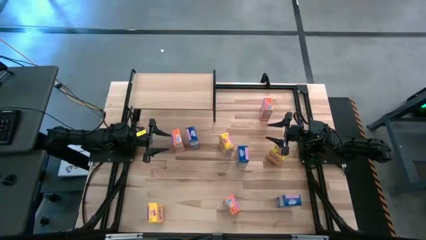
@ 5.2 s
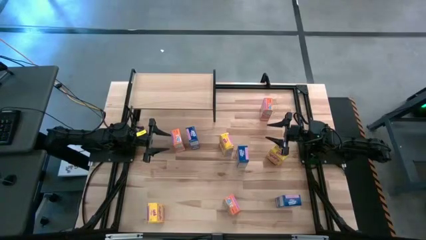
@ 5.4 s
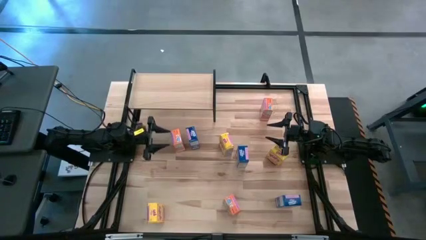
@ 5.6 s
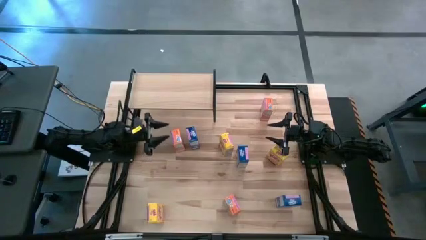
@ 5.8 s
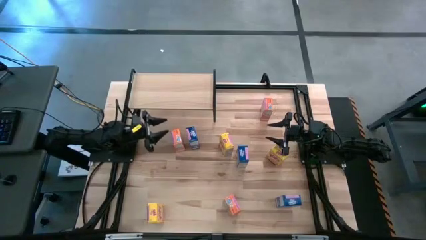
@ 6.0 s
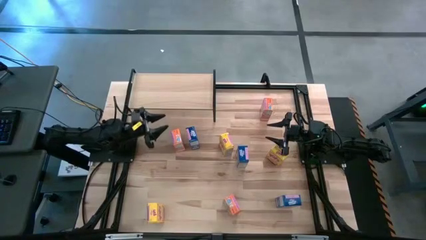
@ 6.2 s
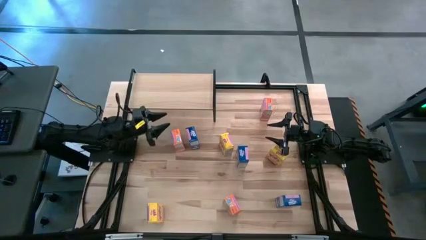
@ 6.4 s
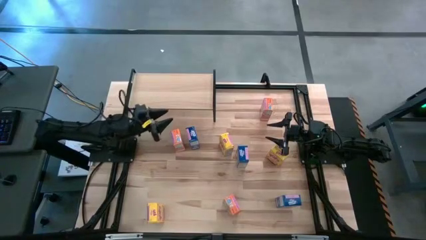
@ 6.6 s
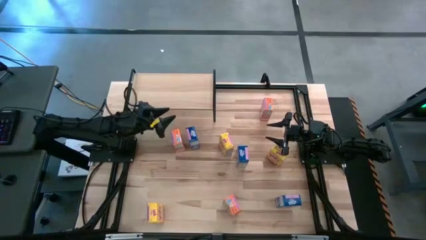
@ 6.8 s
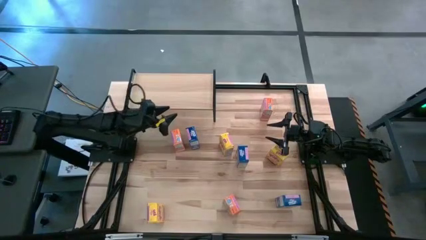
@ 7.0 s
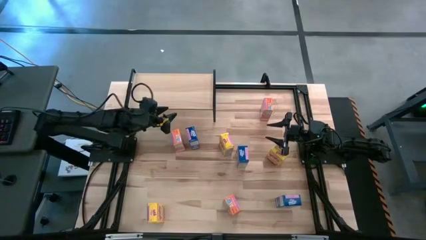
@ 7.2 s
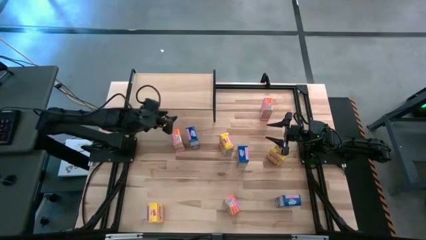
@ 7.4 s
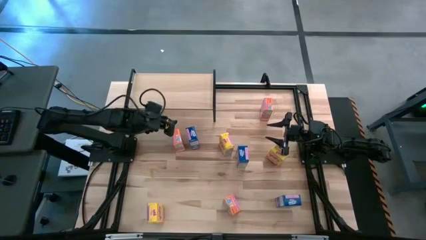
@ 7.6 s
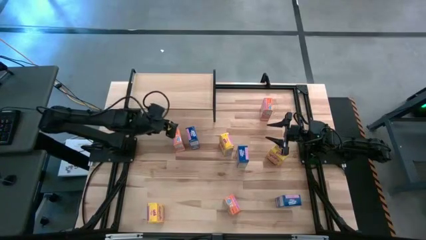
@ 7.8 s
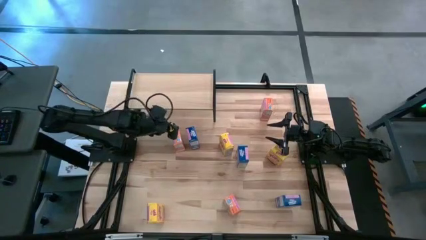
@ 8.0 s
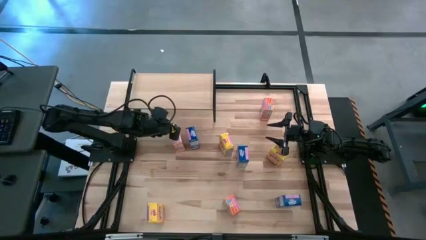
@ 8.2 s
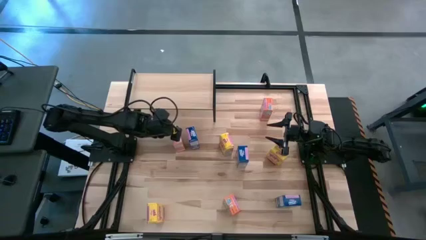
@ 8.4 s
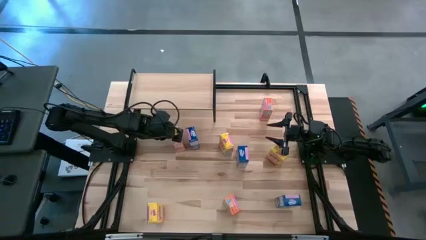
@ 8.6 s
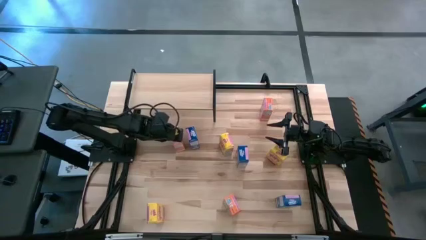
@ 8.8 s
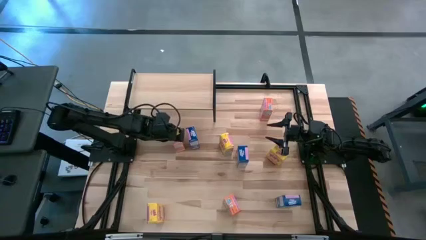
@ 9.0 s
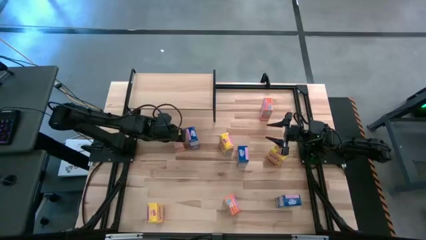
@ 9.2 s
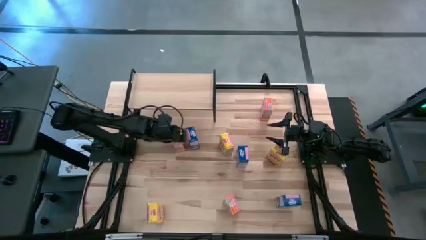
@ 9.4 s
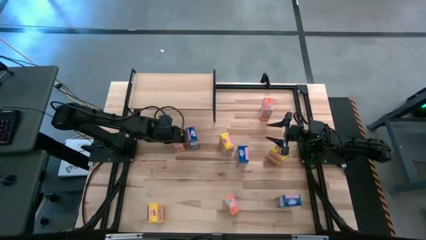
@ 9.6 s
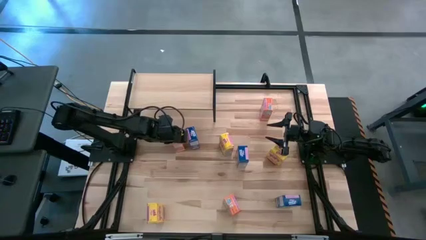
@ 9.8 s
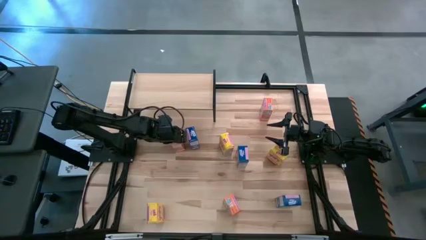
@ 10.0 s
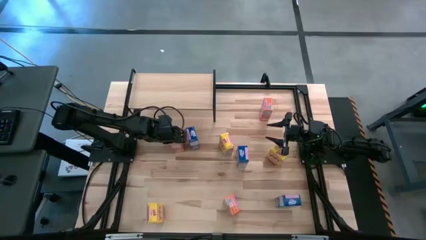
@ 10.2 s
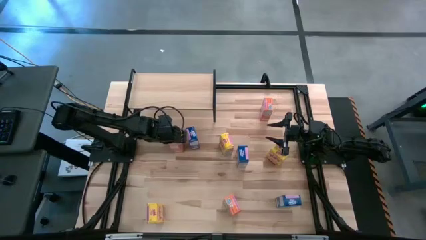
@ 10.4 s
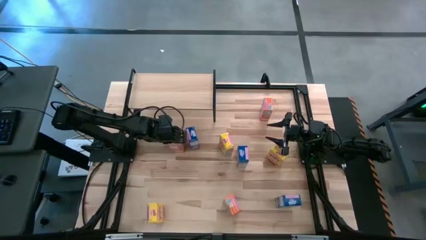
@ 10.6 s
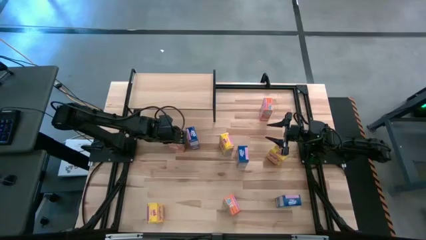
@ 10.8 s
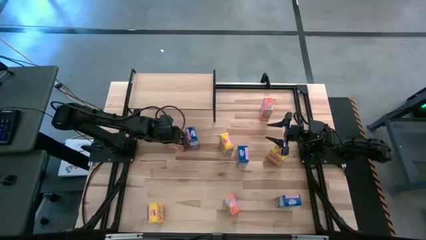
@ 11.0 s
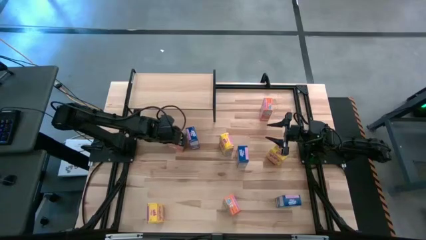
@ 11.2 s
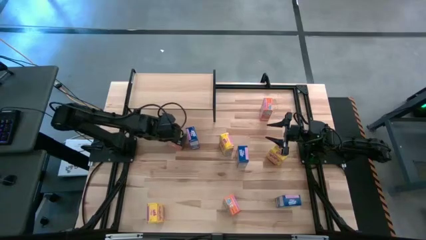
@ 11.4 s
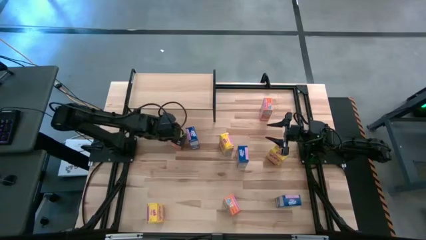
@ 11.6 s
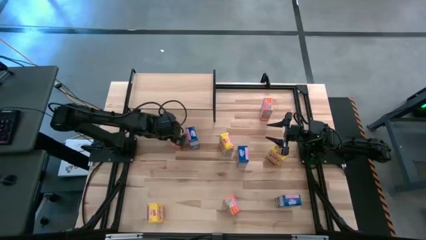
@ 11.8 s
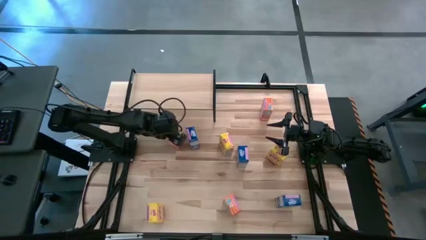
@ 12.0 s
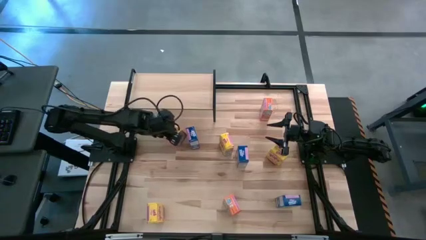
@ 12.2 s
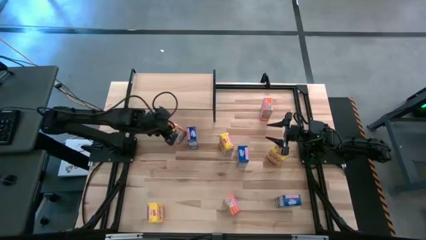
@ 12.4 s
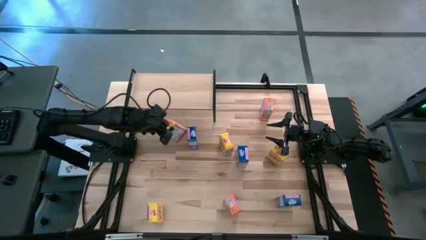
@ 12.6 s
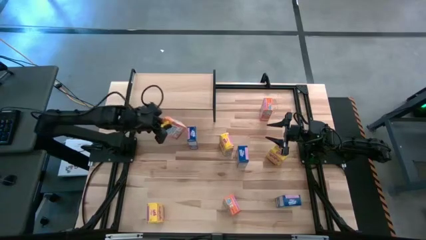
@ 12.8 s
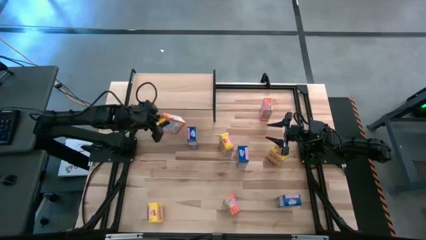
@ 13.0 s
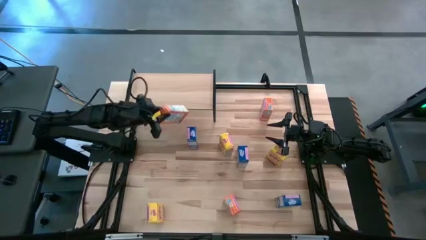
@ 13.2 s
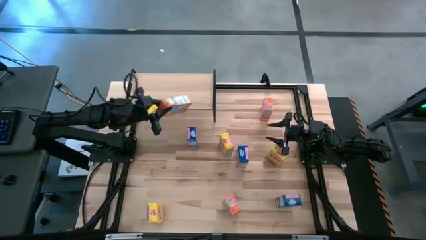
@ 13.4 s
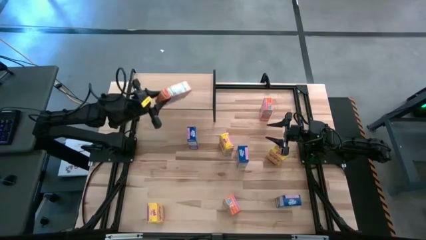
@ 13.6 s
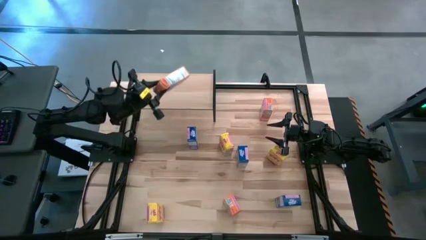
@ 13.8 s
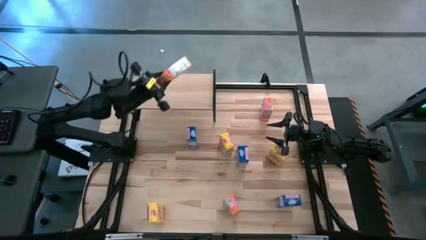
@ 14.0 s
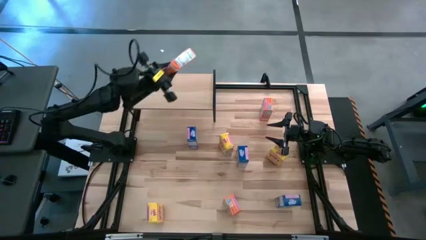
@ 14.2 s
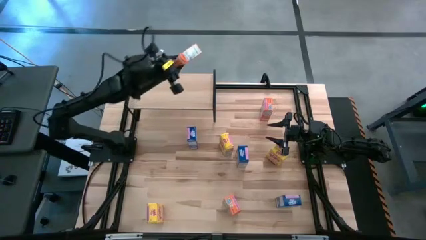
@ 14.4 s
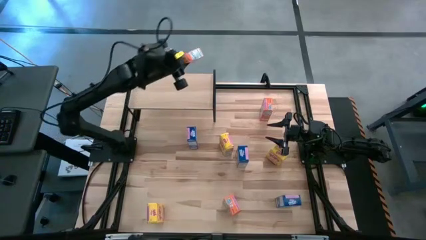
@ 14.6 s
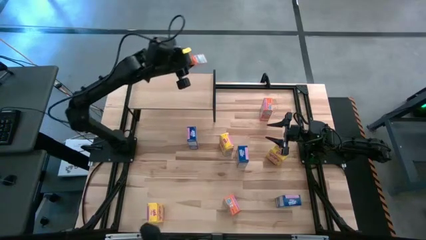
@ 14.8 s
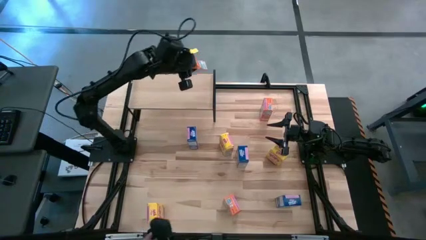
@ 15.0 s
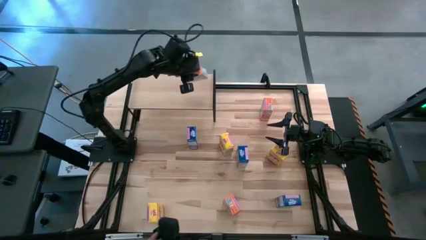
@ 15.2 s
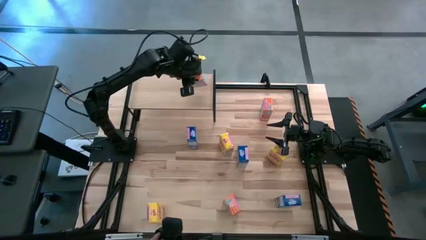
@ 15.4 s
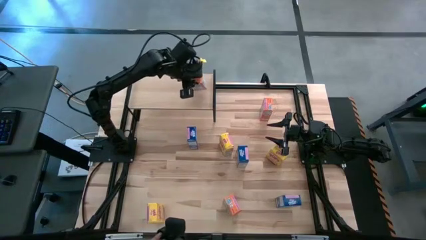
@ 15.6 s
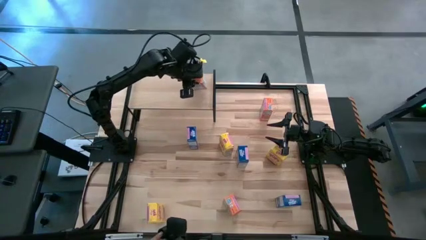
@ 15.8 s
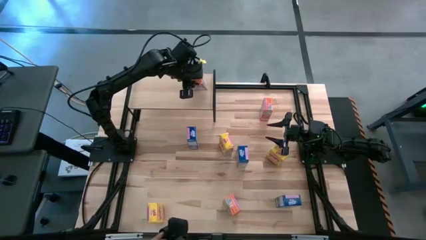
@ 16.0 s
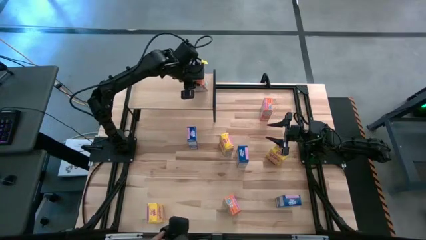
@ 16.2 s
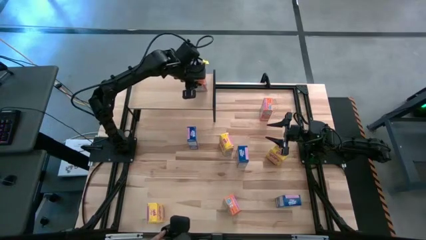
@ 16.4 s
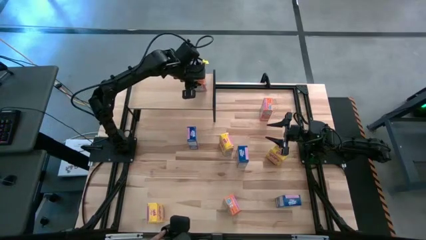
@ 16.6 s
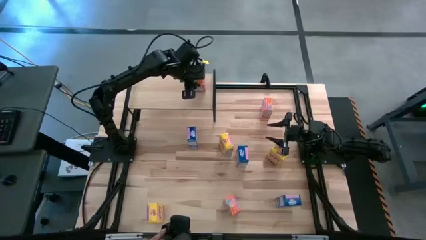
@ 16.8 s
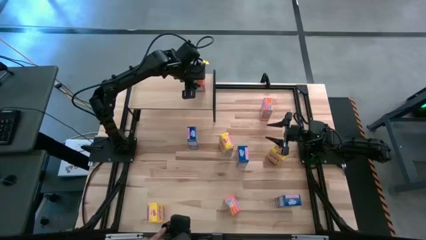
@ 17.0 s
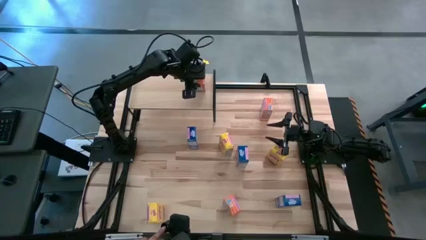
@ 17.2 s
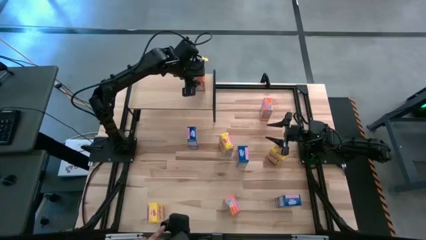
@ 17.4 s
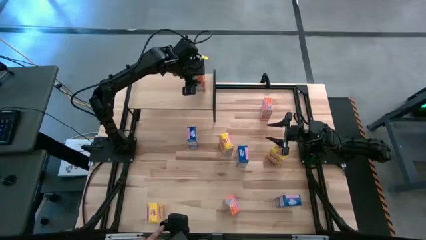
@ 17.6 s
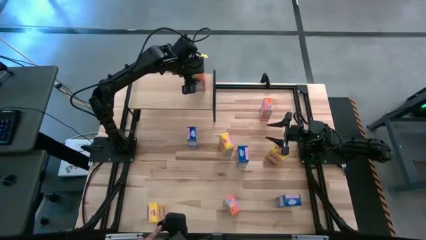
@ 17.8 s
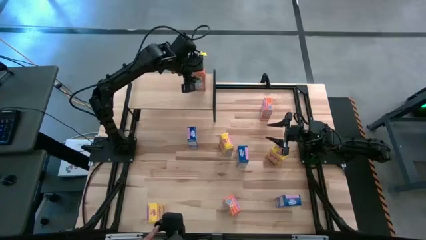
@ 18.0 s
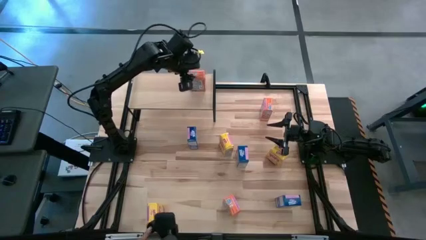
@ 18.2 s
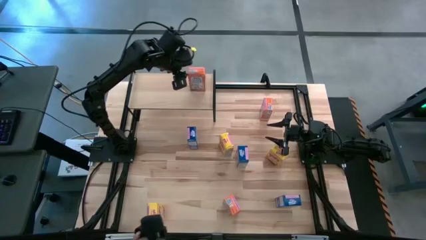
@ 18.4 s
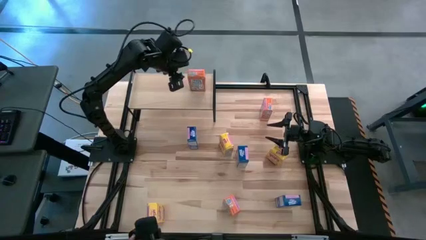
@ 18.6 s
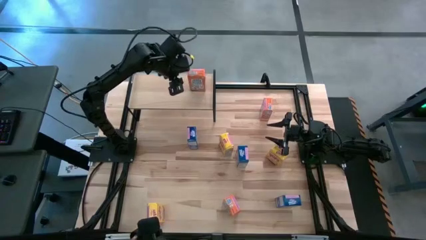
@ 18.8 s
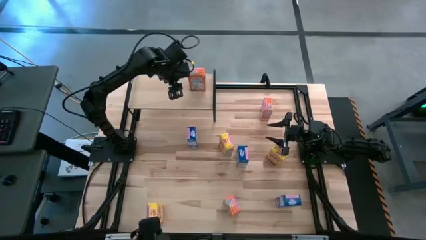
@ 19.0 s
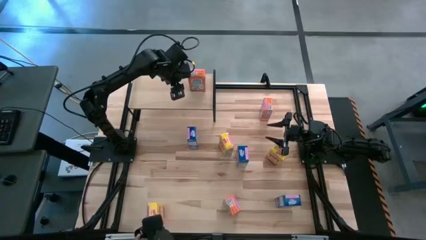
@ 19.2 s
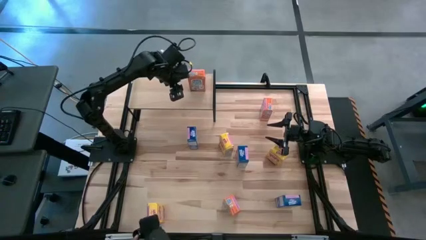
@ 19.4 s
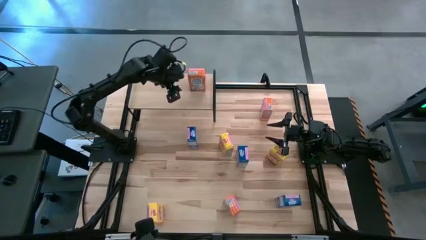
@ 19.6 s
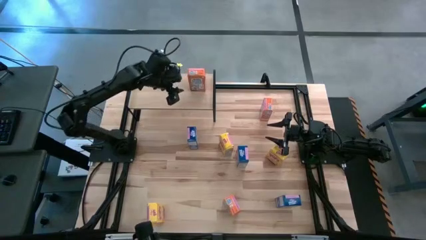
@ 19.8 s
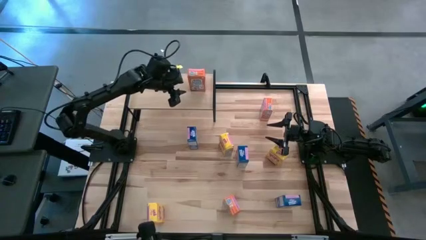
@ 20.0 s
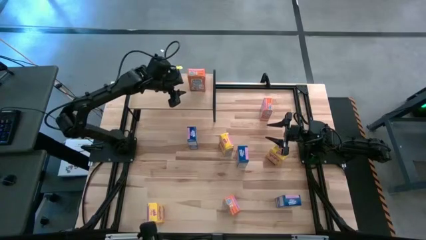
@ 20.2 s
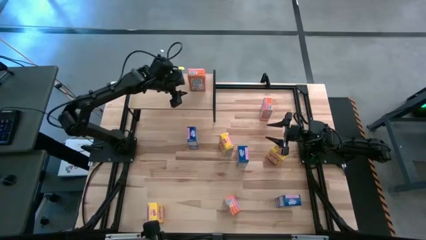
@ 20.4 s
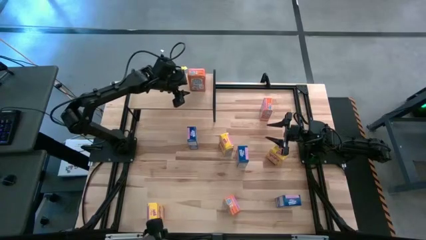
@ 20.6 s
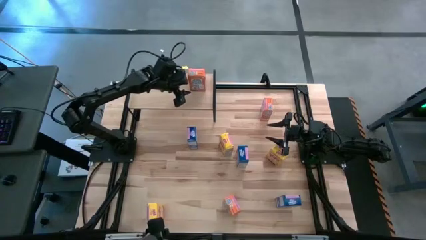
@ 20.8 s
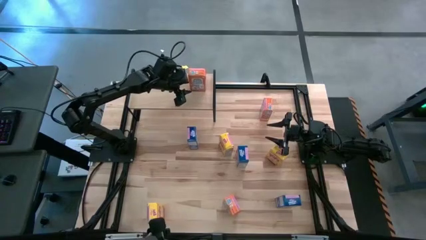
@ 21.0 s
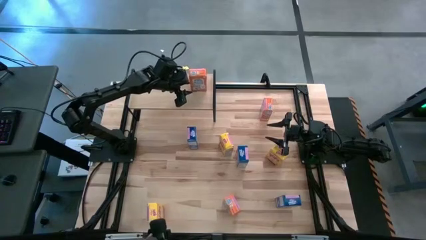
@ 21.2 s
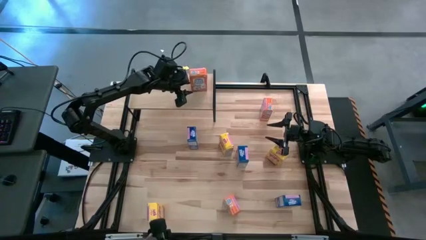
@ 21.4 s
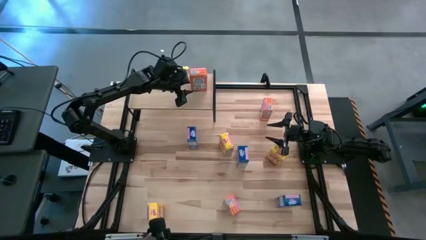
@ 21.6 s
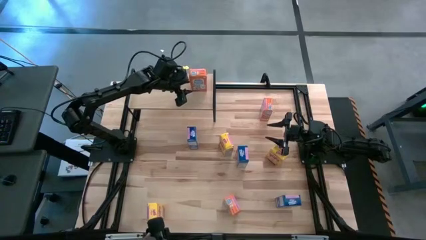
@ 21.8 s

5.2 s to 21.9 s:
Task: Stack cereal on shelf
Put the middle left orange cereal box on the shelf
